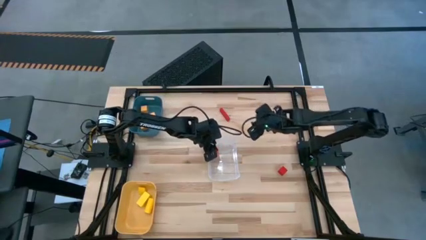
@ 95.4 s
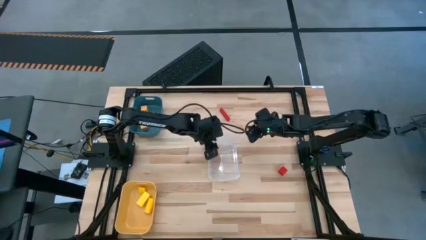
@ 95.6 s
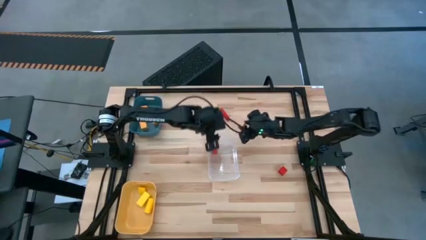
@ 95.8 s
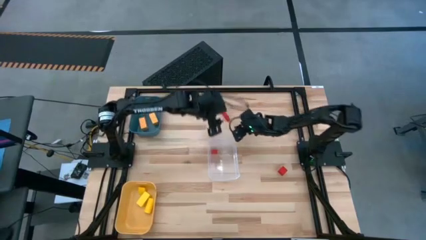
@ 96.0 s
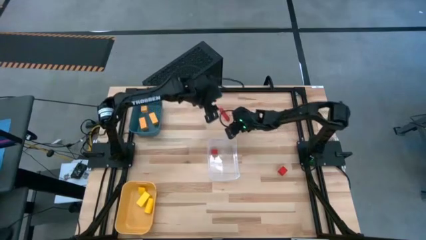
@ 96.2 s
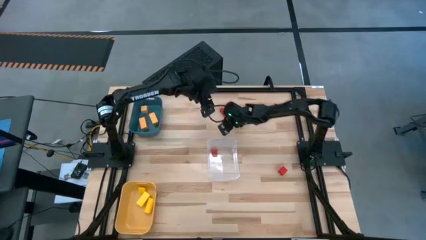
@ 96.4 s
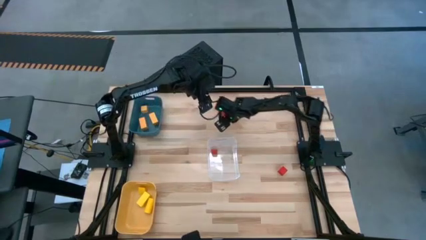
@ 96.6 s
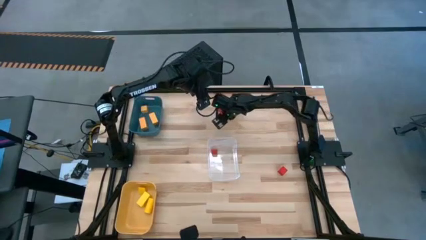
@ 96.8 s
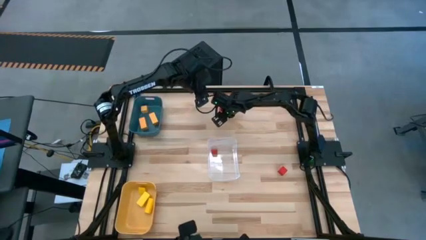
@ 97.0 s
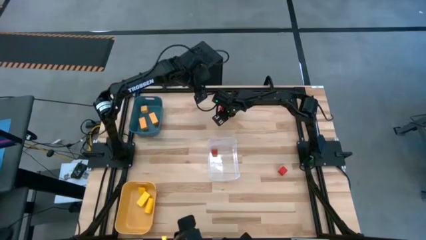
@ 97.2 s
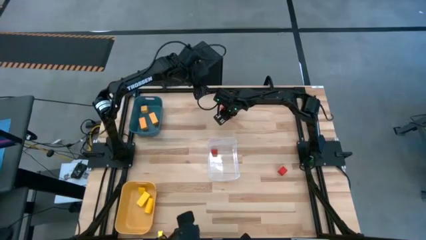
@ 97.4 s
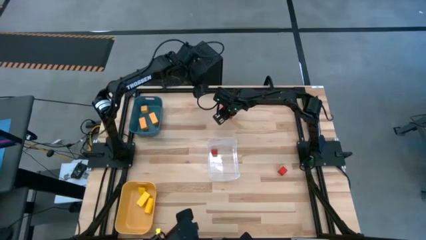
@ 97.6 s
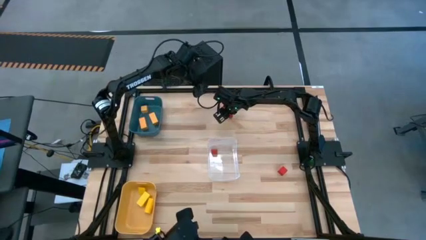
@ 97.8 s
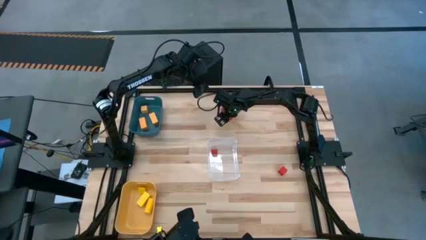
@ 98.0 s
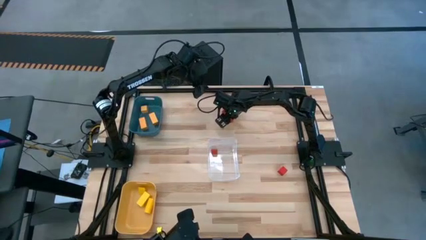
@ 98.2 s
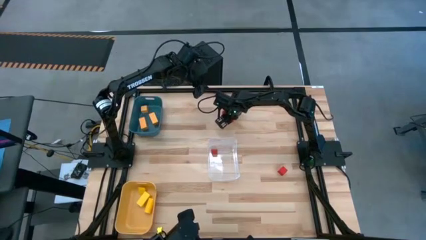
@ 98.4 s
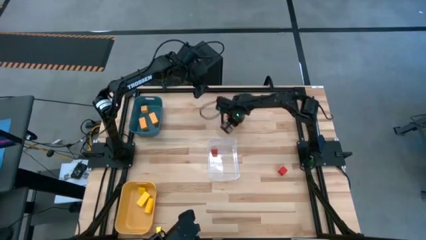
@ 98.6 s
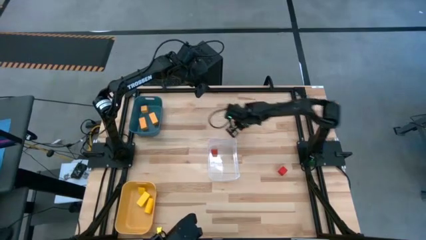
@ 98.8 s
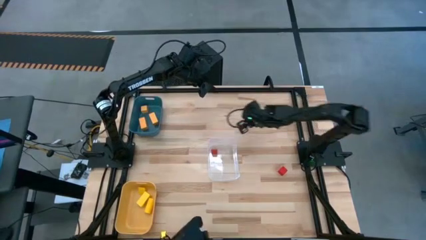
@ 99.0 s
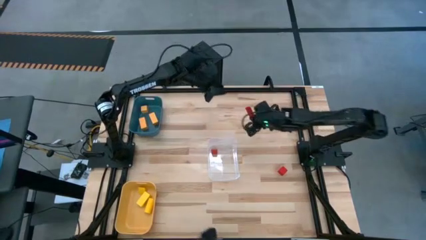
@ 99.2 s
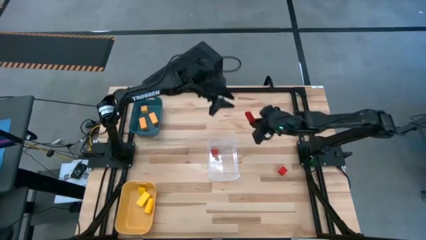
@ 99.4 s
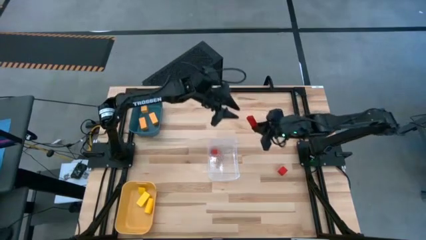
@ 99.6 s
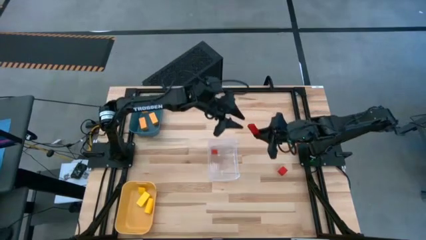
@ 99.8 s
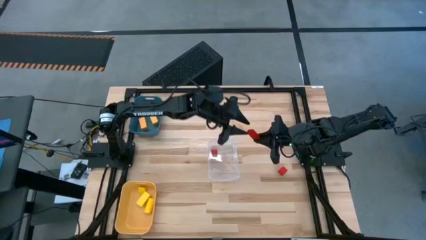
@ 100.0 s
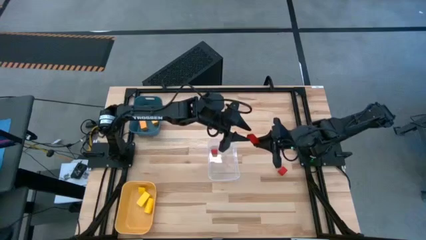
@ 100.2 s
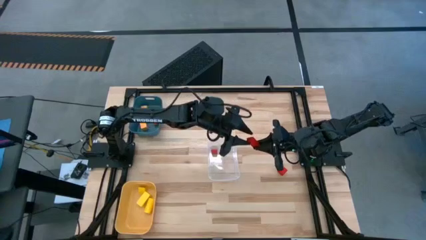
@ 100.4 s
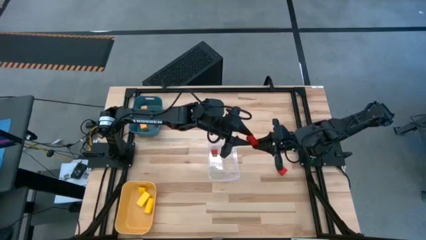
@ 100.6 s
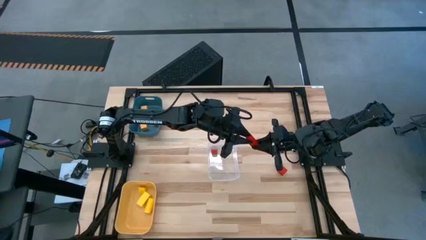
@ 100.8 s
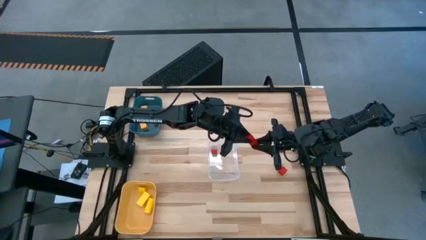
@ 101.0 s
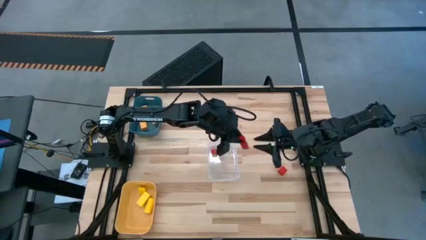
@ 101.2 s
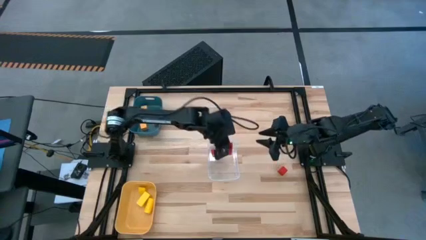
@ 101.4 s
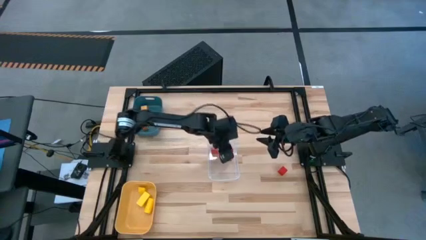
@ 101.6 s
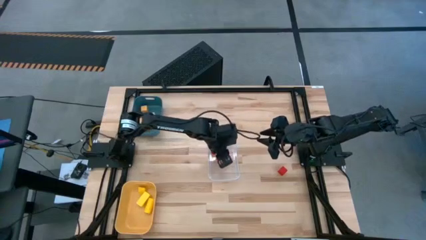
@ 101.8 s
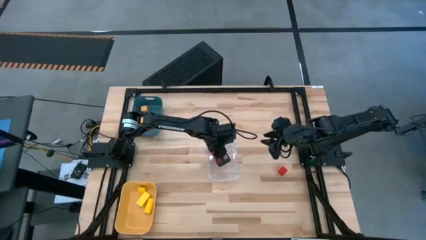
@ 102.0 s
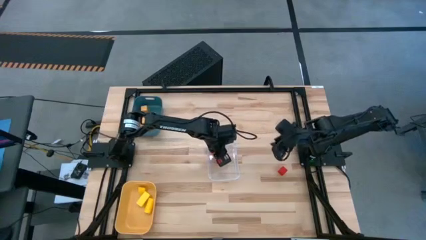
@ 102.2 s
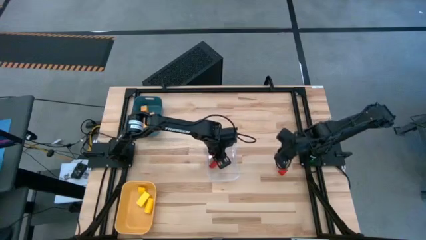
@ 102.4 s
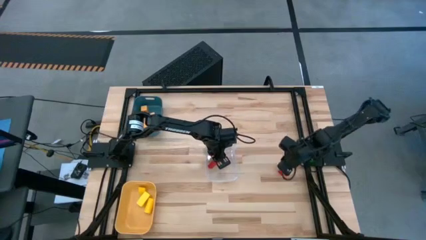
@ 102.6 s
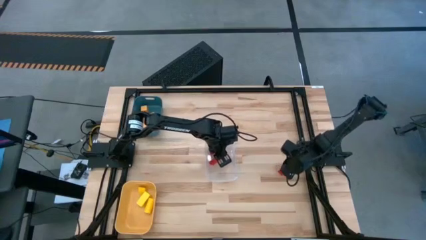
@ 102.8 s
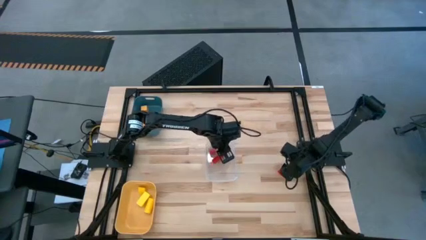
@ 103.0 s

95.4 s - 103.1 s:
Task: Sort & place blocks by color
Put the top red block into the transparent bin

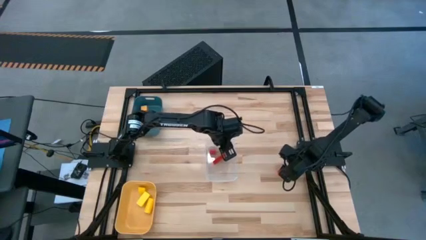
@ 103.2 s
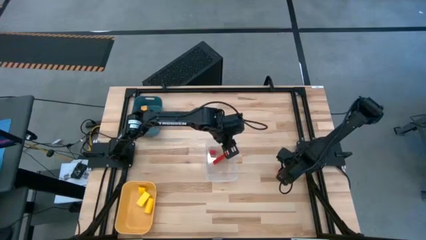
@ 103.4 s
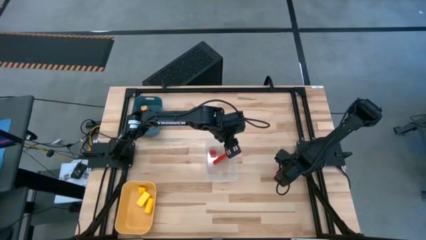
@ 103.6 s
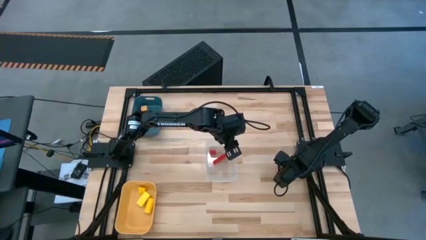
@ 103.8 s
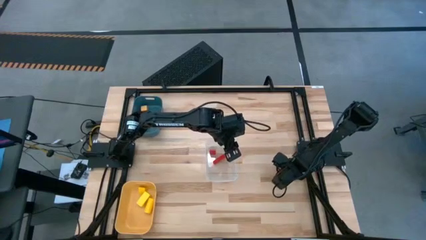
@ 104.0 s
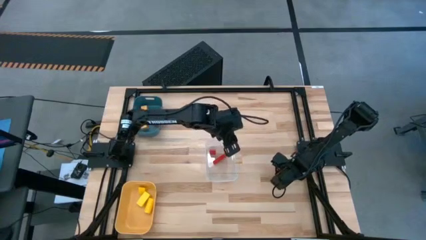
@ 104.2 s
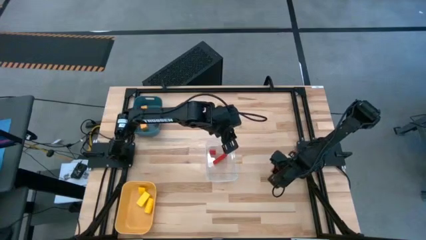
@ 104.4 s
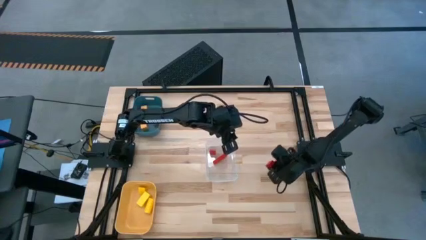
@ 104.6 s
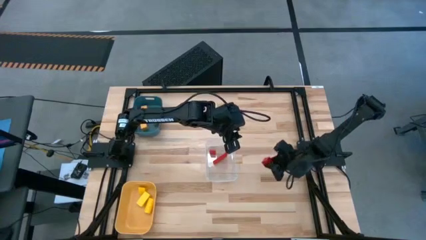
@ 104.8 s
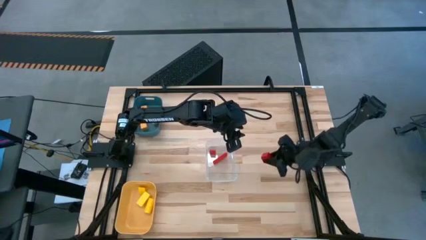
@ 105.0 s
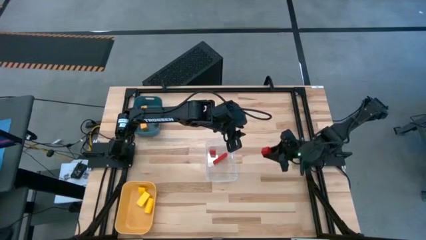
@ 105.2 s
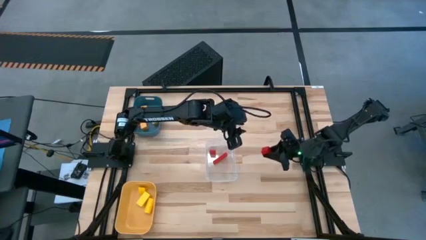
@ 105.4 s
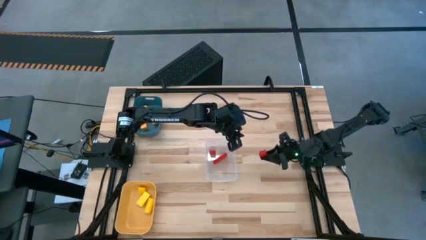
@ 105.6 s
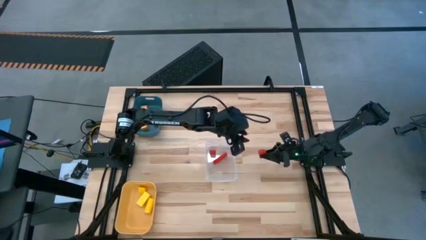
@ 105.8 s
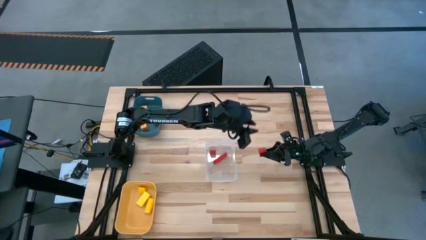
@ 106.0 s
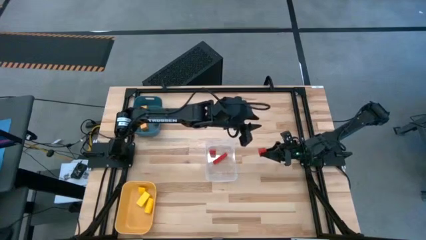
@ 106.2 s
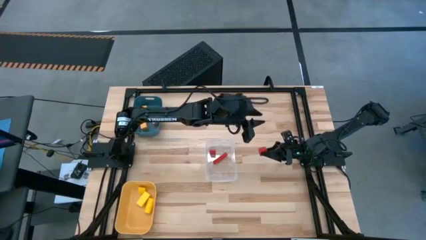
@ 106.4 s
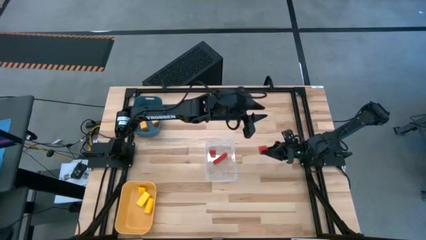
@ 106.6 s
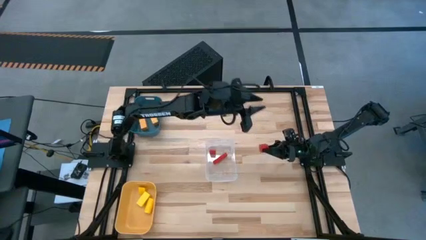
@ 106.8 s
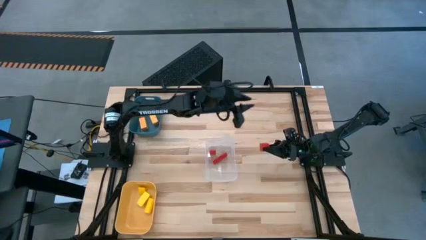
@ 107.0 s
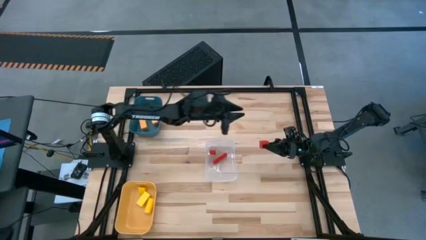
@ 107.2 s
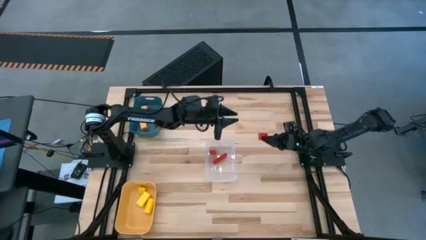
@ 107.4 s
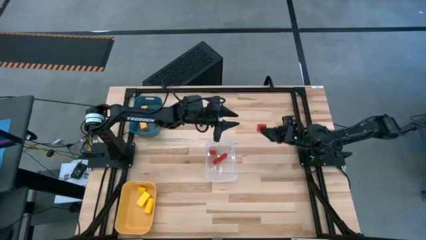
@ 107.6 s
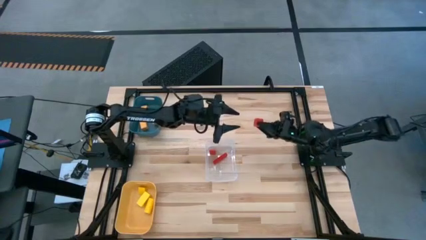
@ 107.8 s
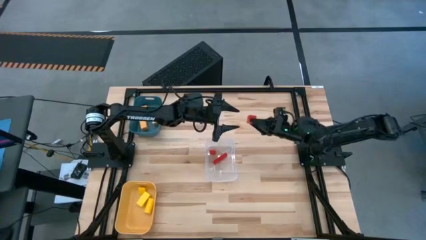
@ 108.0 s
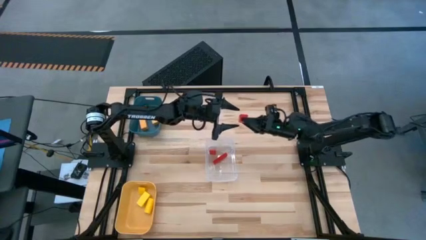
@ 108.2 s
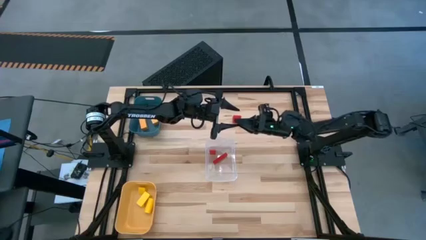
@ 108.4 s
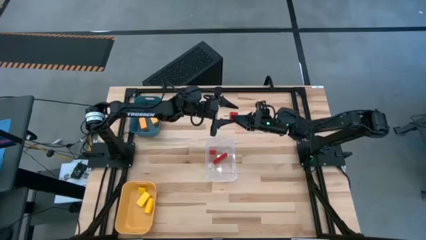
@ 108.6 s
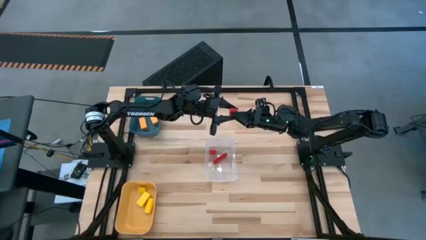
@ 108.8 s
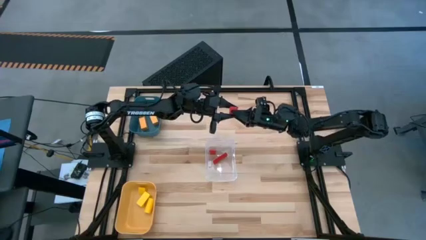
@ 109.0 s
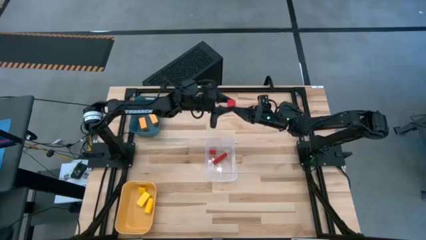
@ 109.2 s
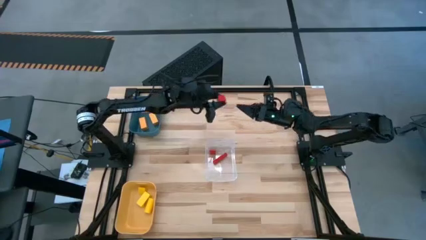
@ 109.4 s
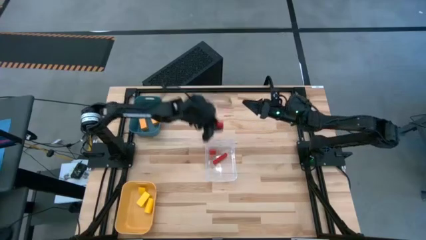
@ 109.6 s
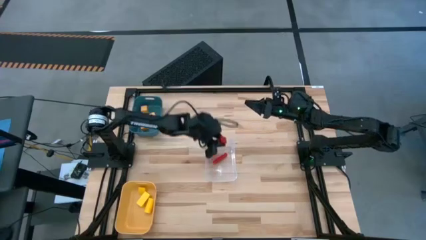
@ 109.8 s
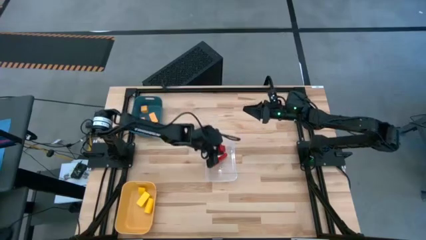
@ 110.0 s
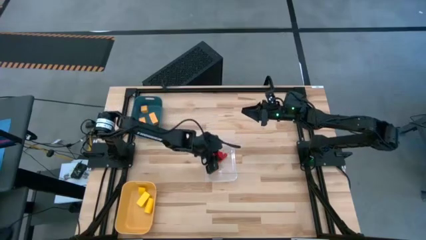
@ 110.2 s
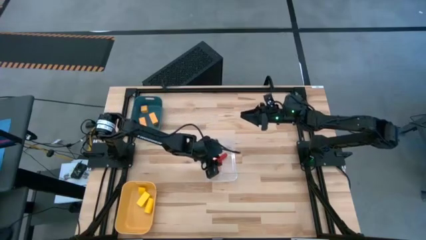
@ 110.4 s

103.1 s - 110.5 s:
Put the red block into the transparent bin

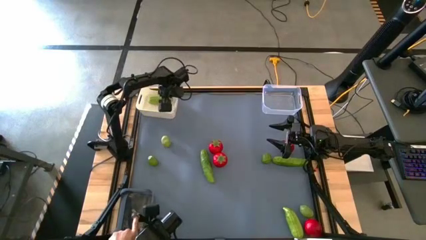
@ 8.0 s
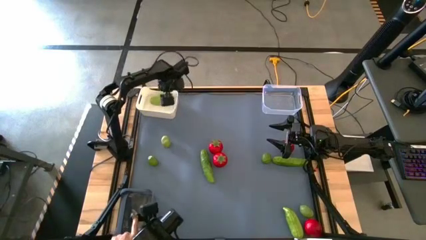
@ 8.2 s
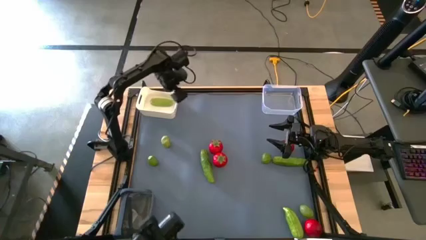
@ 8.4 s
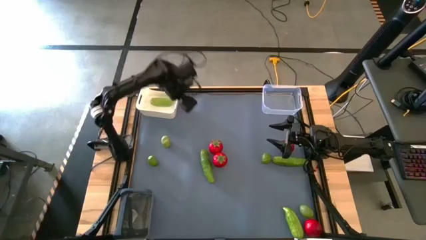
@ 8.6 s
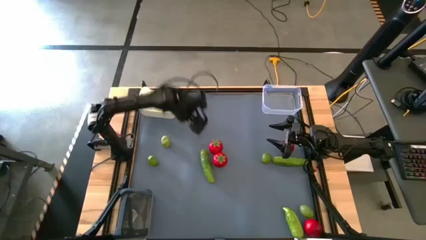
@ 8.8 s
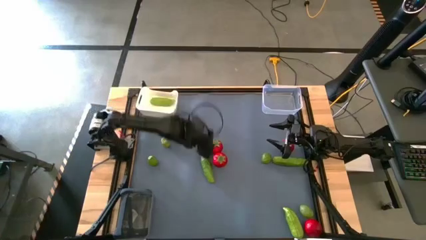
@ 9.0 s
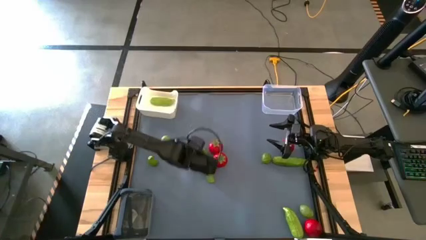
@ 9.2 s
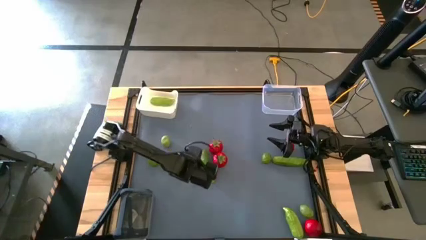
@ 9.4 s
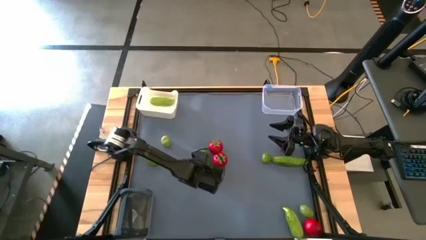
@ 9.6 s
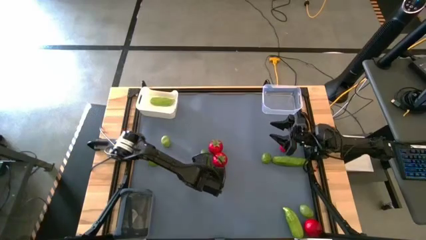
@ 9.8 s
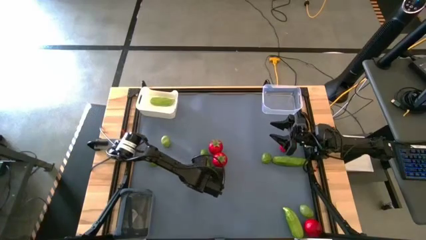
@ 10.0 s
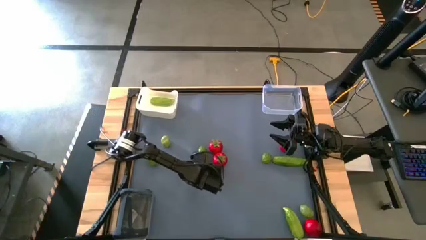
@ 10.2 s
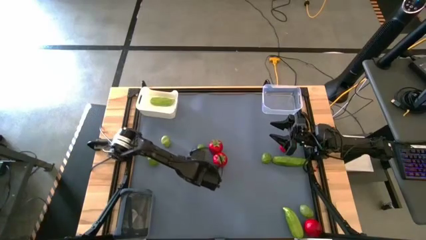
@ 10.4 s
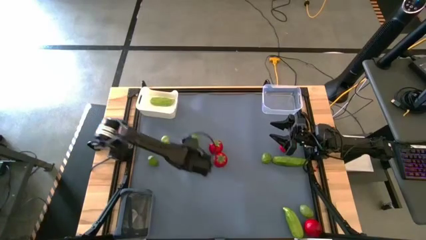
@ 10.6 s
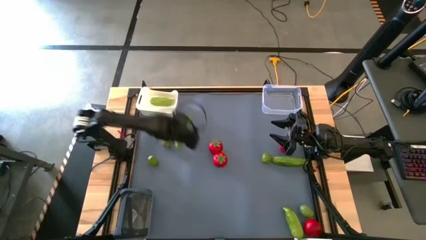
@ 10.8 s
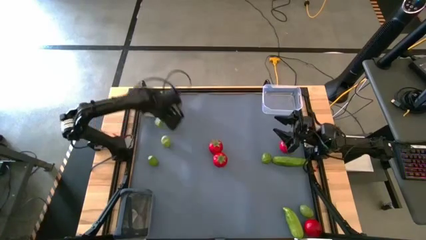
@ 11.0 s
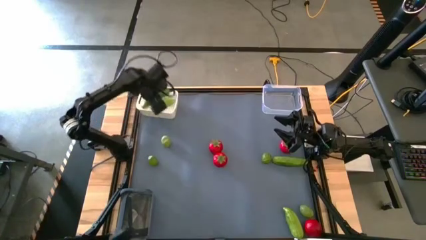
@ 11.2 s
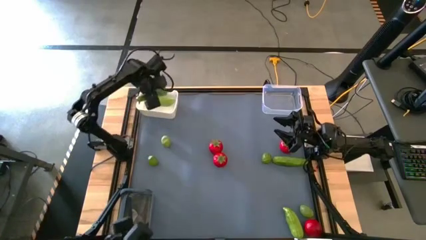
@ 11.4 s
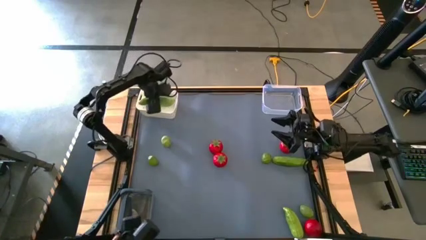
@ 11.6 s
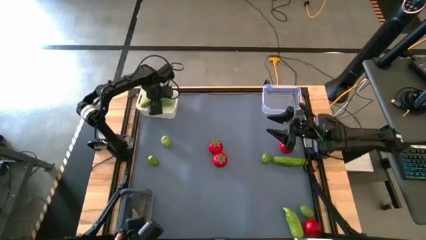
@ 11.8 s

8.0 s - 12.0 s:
Task: Sort produce into baskets
Put the left cucumber into the white bin
